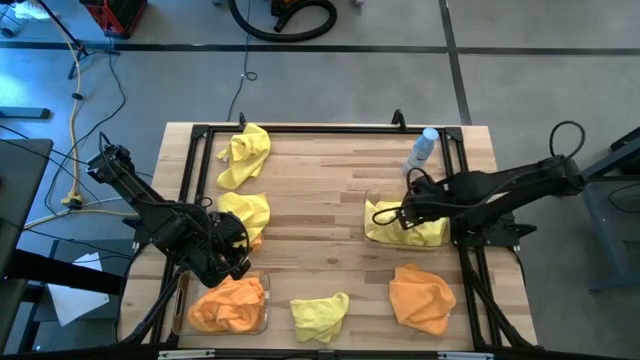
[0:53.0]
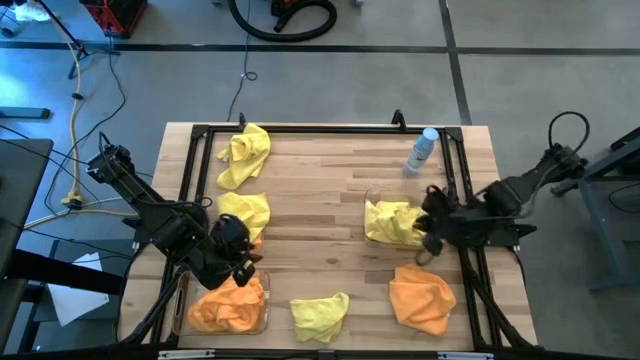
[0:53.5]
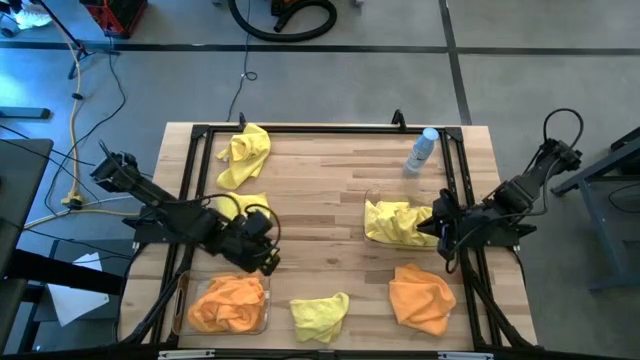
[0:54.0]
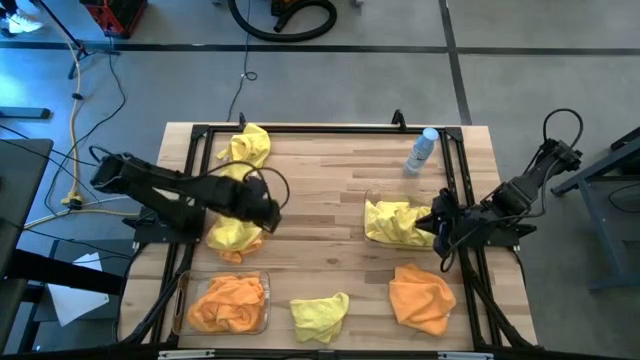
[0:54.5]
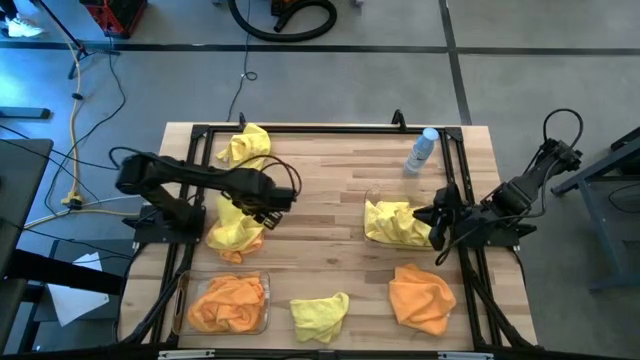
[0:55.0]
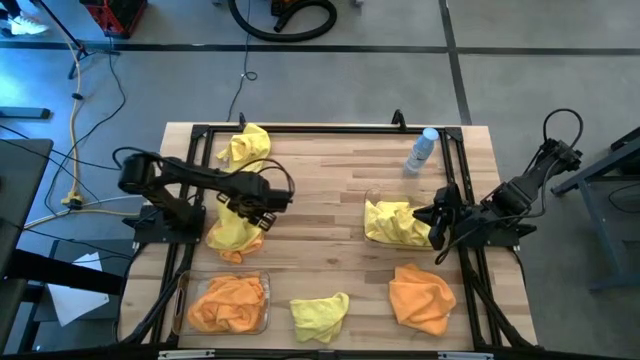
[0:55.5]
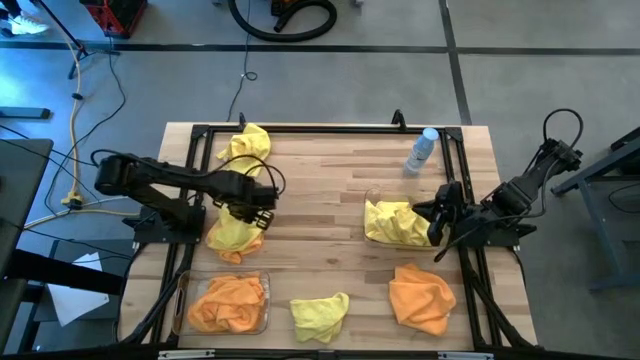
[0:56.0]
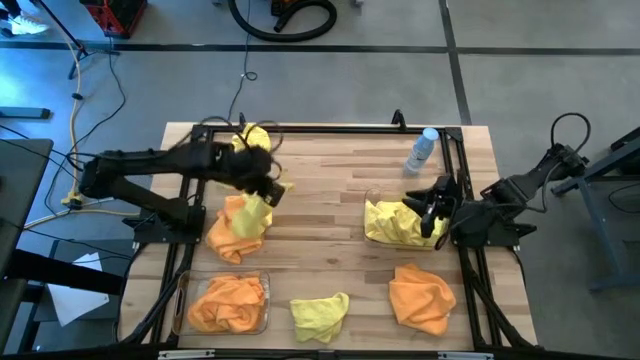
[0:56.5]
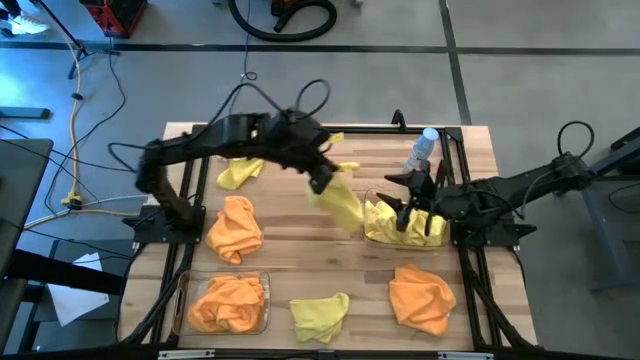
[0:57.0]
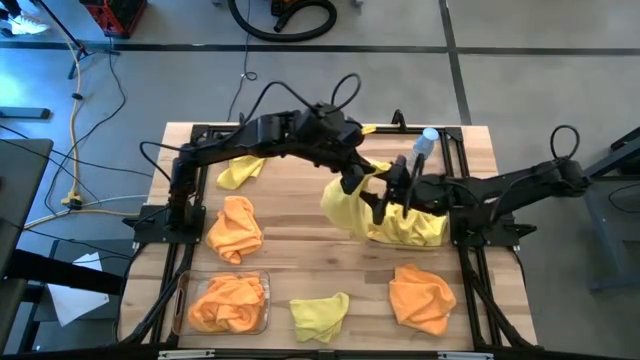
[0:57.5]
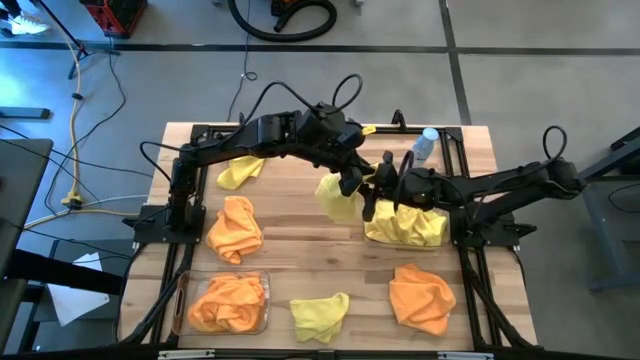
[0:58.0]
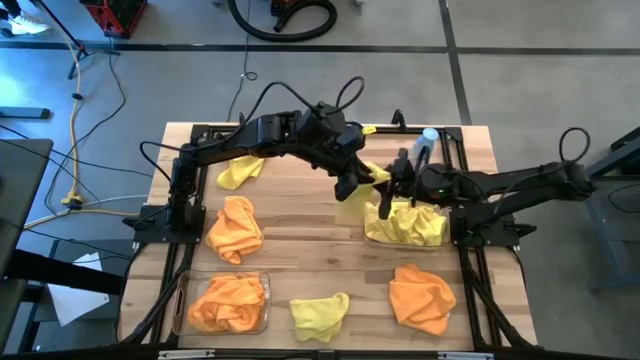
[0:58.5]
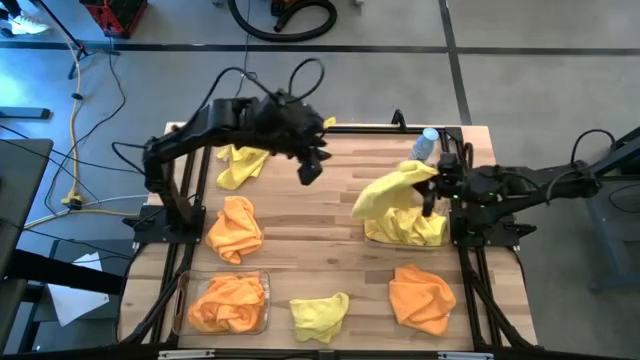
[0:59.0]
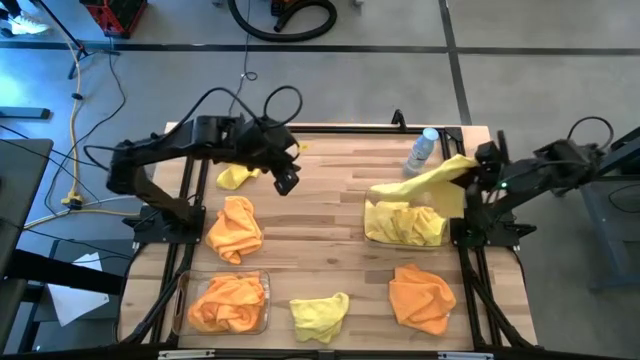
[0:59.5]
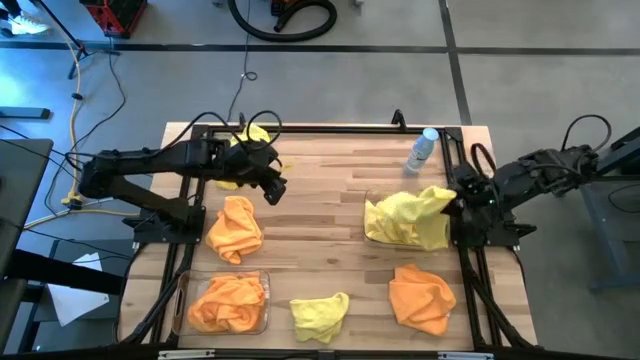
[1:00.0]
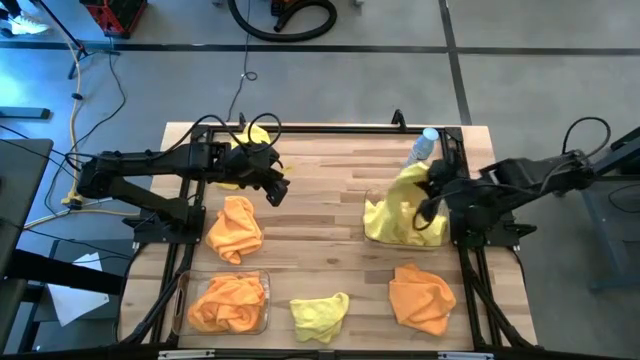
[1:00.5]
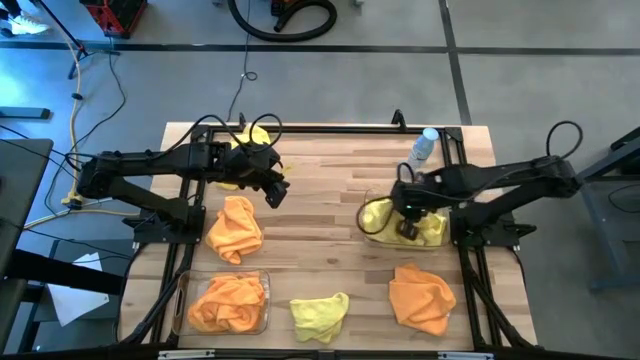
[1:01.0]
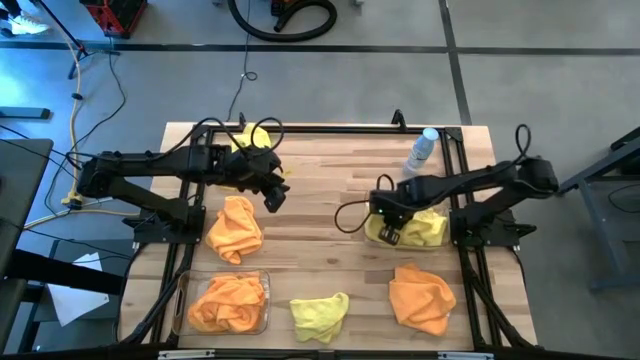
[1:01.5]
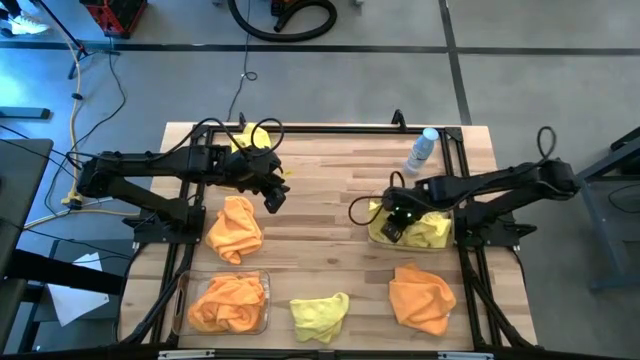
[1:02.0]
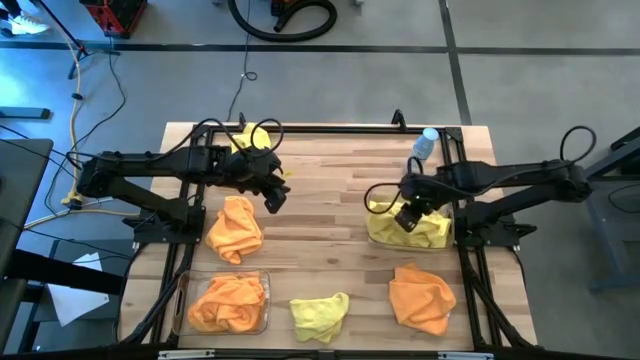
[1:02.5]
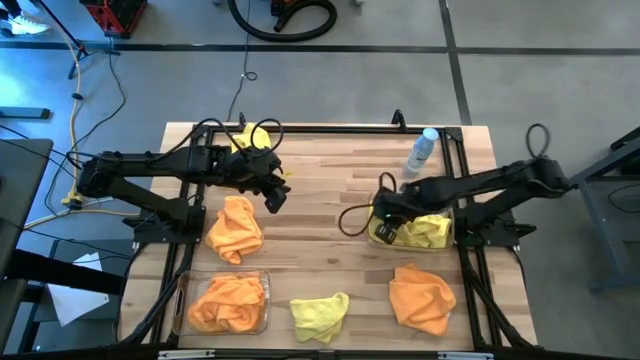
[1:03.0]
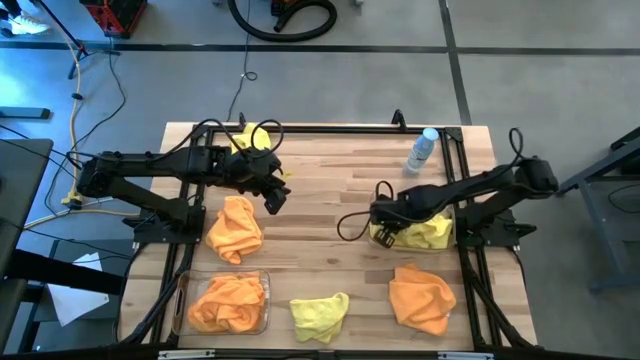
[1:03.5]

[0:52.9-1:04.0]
Task: Sort microfiber towel by color & place in baskets
Put the yellow microfiber cloth into the right transparent bin

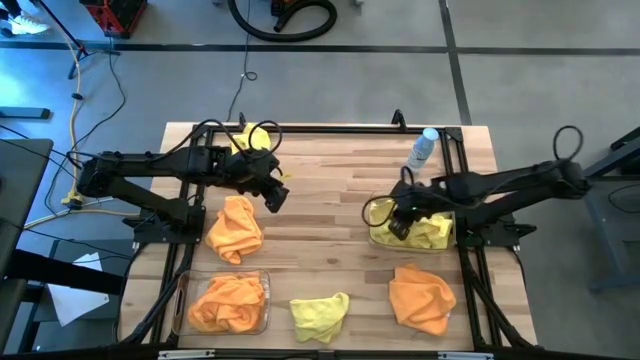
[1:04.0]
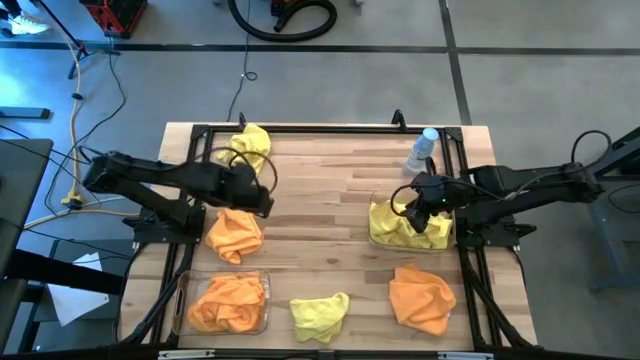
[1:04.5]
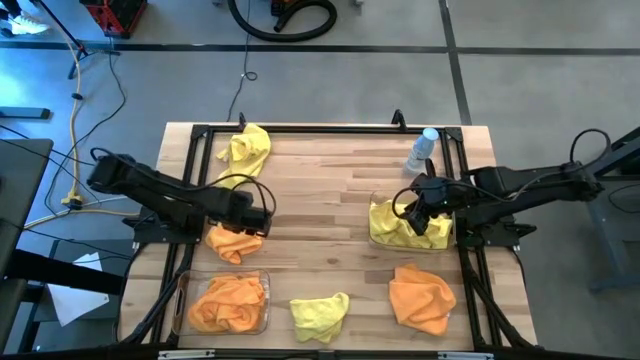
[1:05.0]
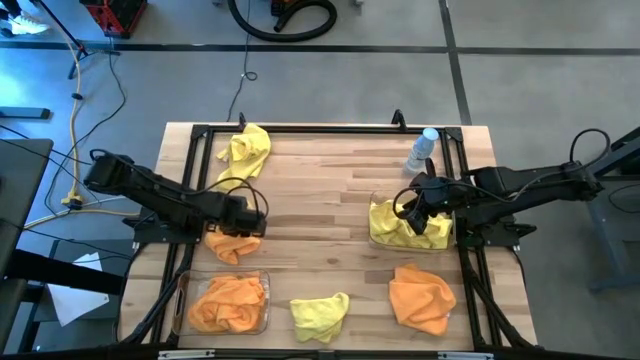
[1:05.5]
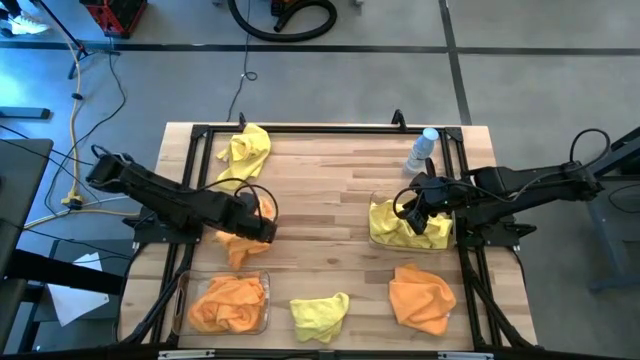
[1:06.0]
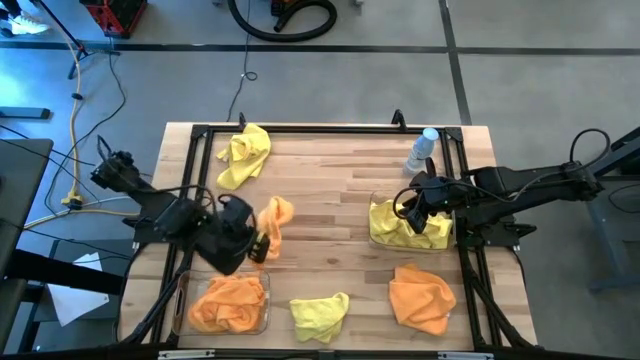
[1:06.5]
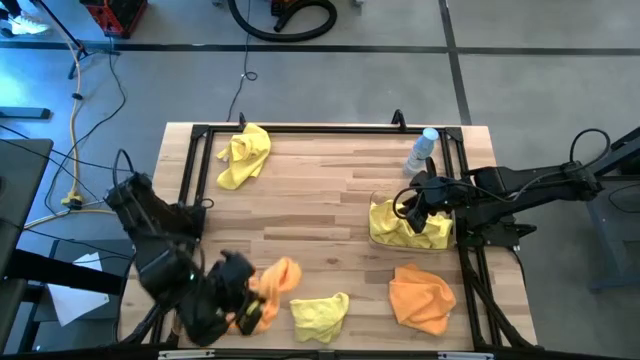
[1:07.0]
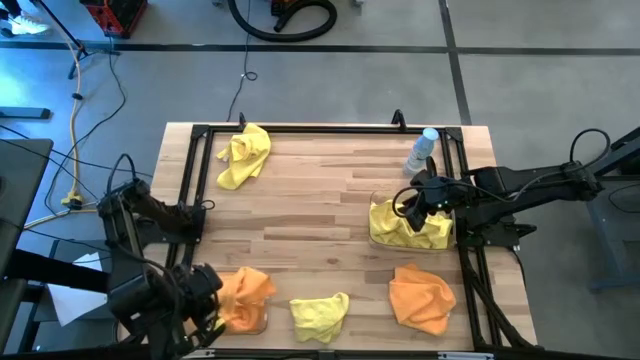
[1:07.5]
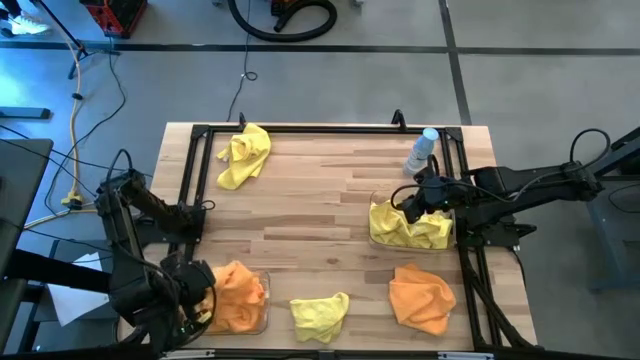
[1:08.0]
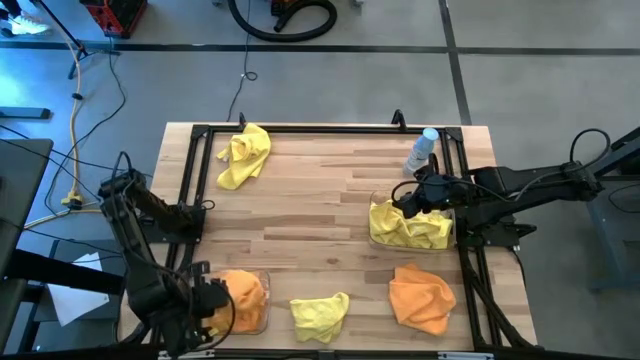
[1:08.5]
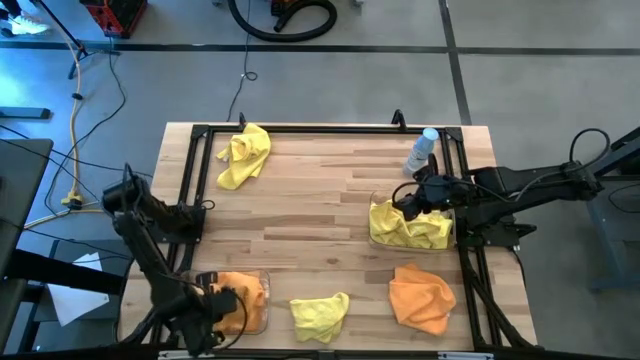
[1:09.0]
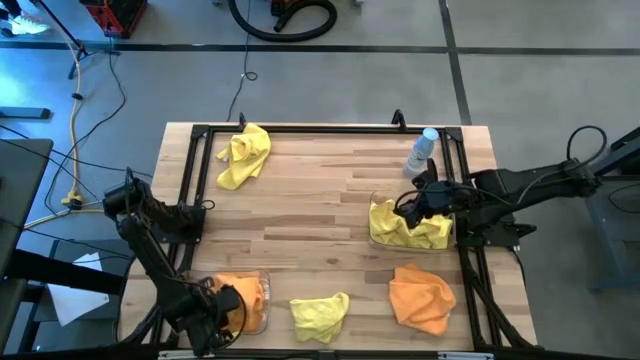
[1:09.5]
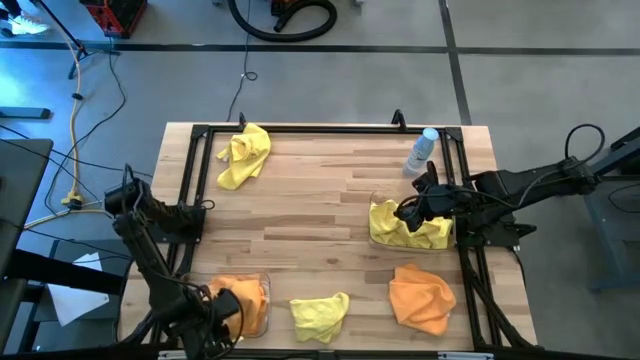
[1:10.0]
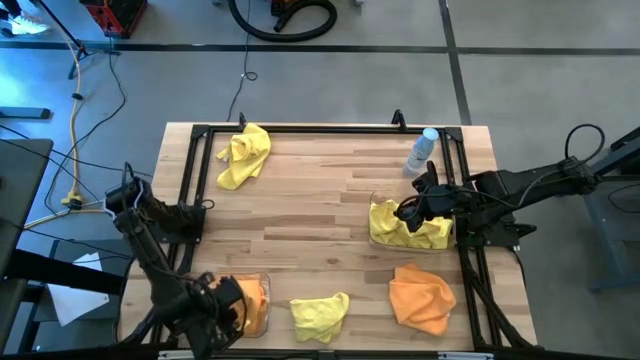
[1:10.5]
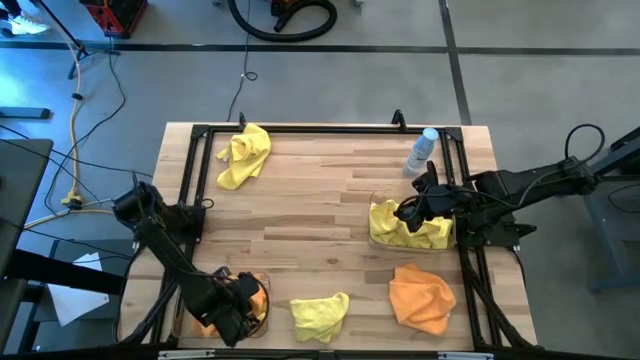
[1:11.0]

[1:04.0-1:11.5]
Put the orange microfiber cloth into the left transparent bin

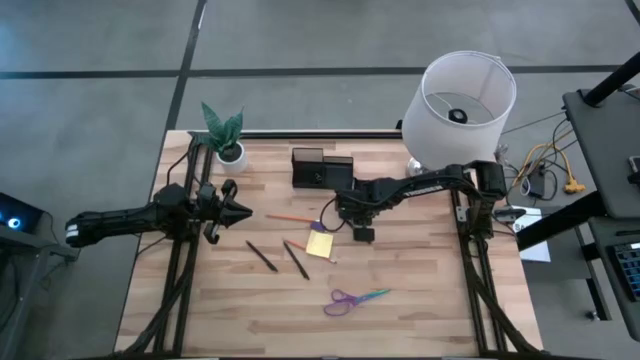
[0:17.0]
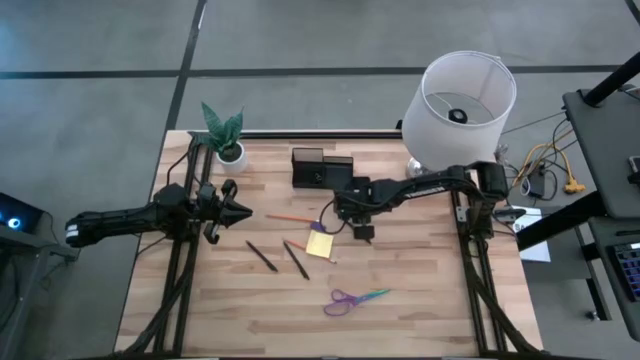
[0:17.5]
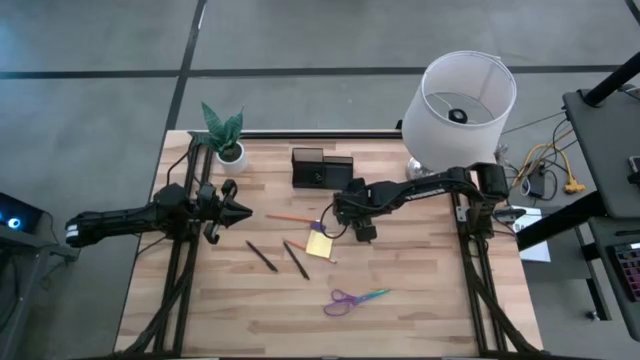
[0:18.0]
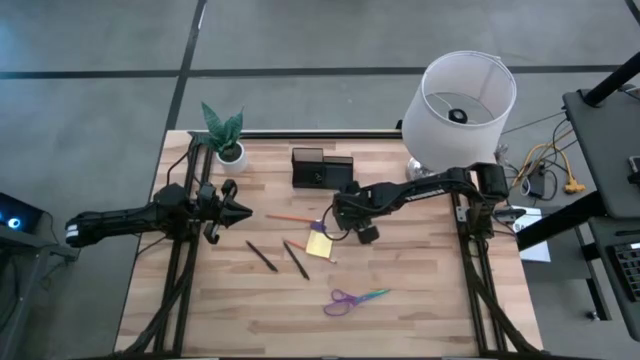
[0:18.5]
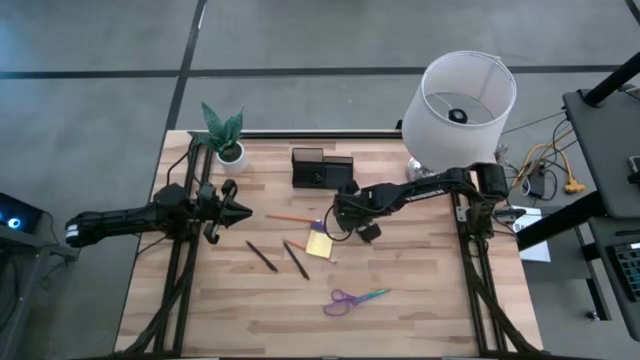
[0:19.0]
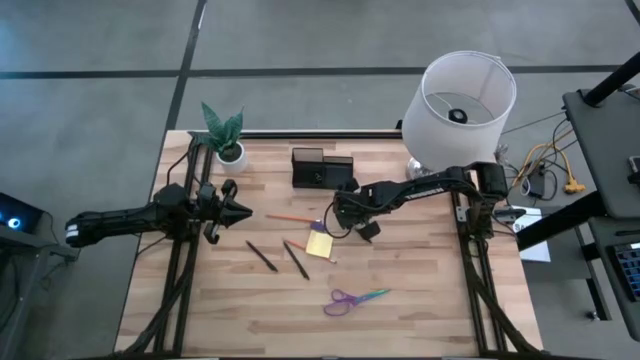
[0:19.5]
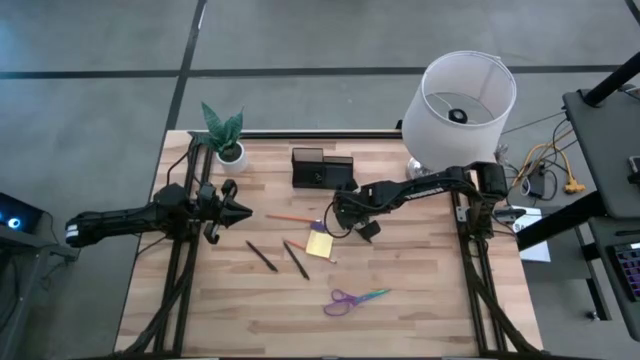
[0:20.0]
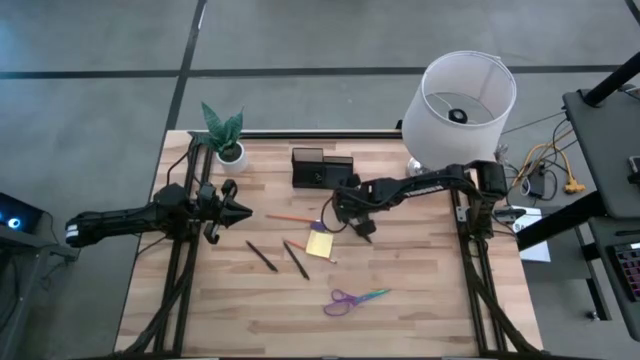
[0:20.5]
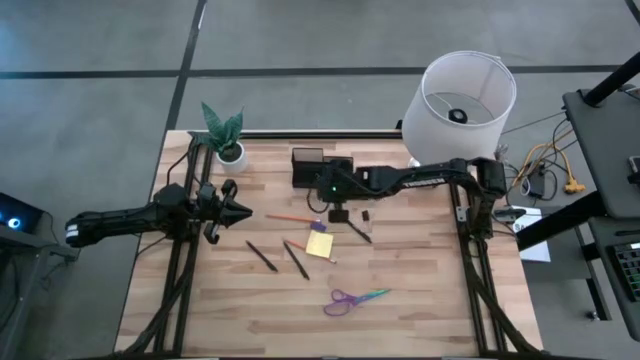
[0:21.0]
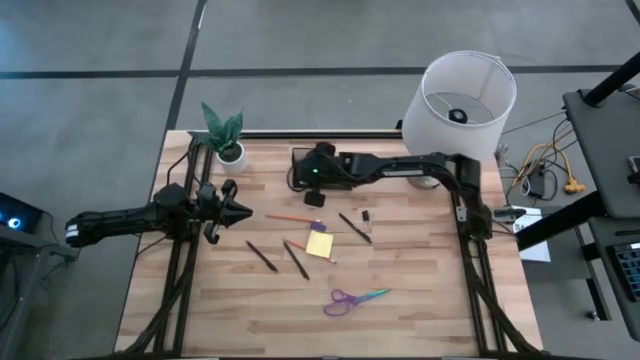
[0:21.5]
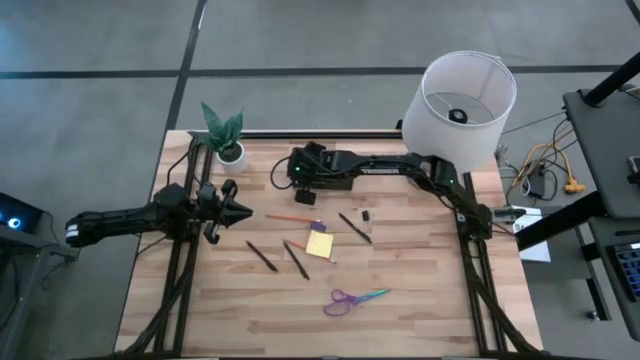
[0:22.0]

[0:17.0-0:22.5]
Task: Pick and place office supplies into organizer
Put the left black binder clip into the black desk organizer
